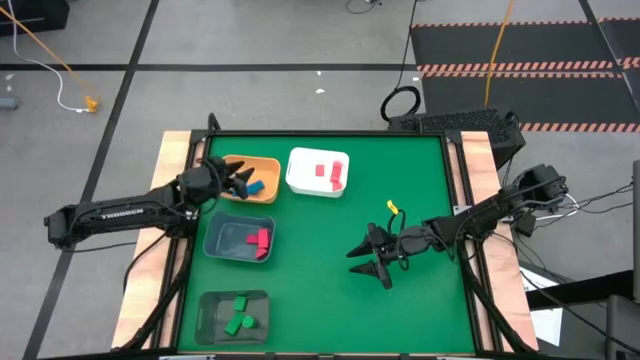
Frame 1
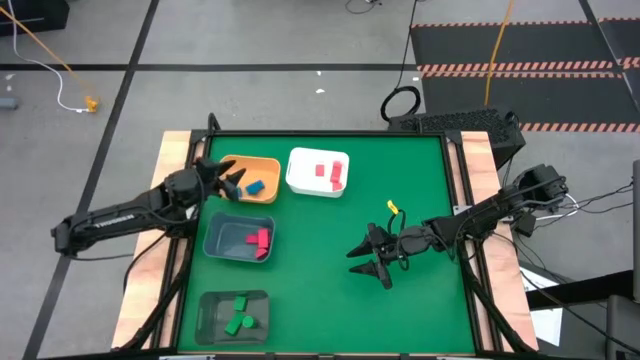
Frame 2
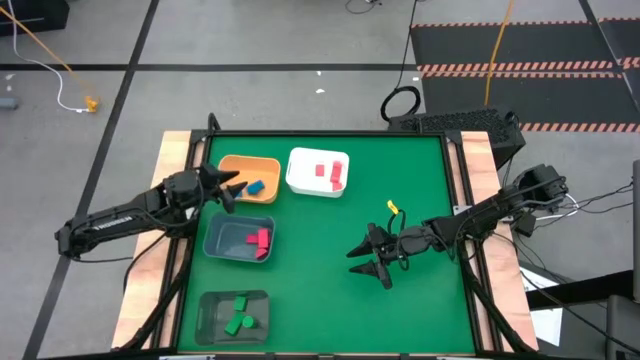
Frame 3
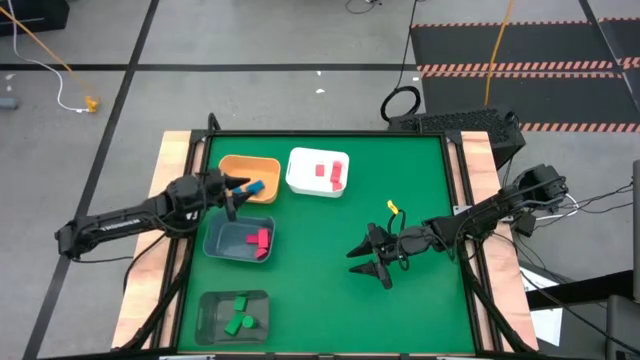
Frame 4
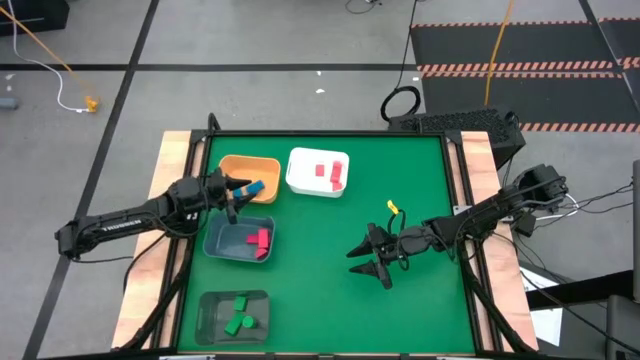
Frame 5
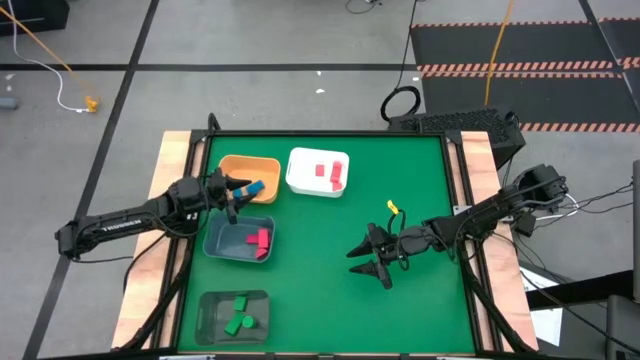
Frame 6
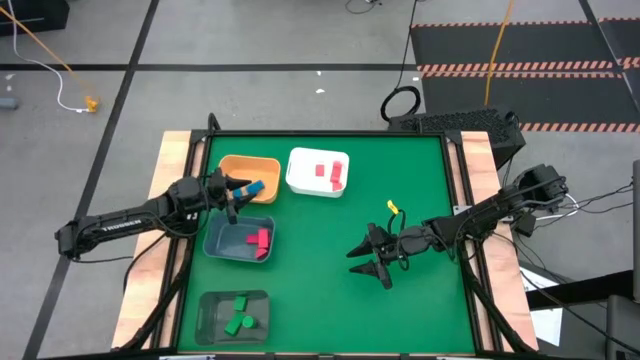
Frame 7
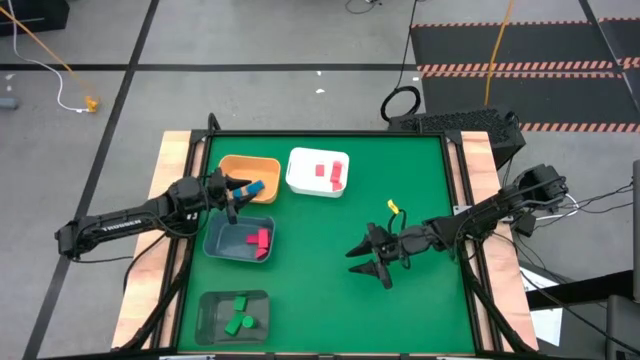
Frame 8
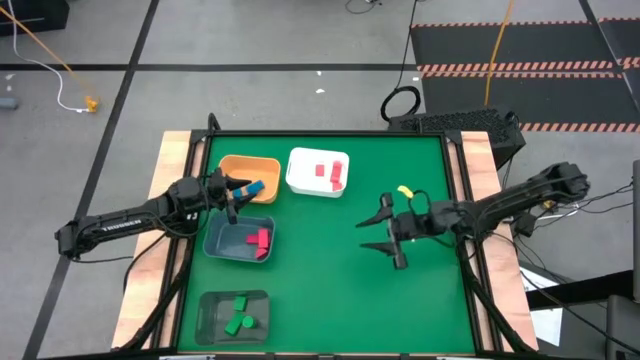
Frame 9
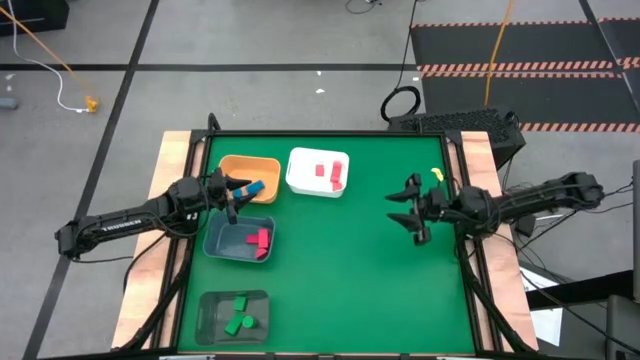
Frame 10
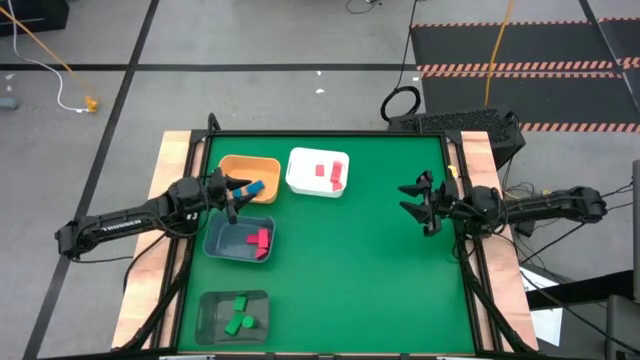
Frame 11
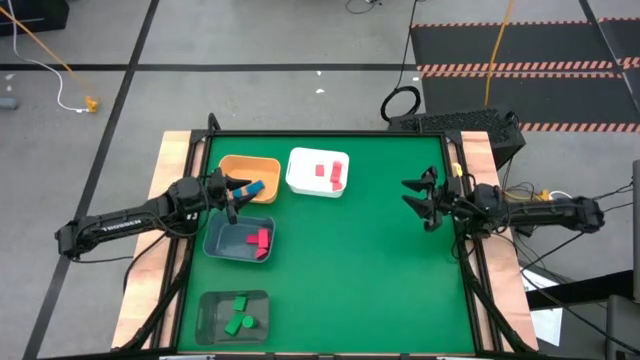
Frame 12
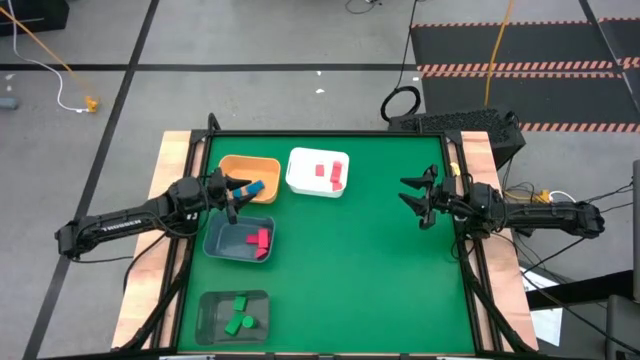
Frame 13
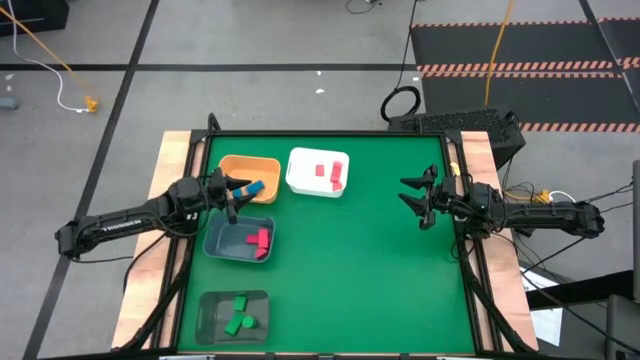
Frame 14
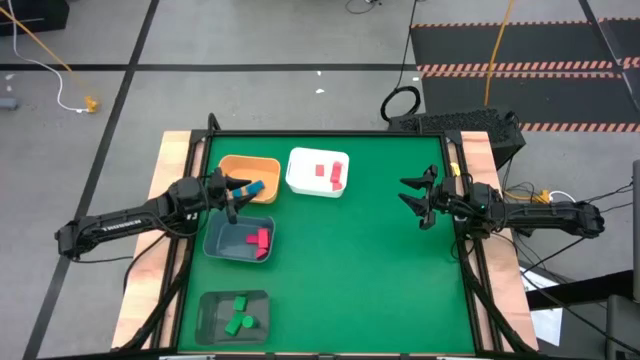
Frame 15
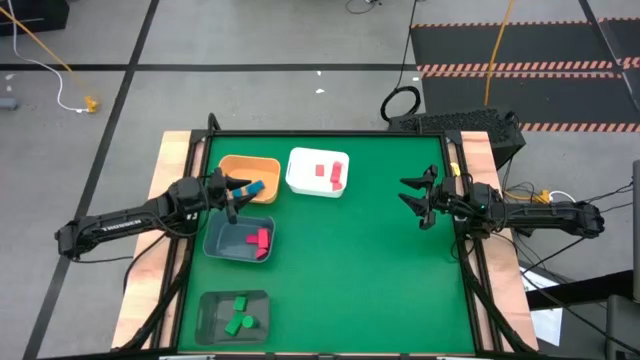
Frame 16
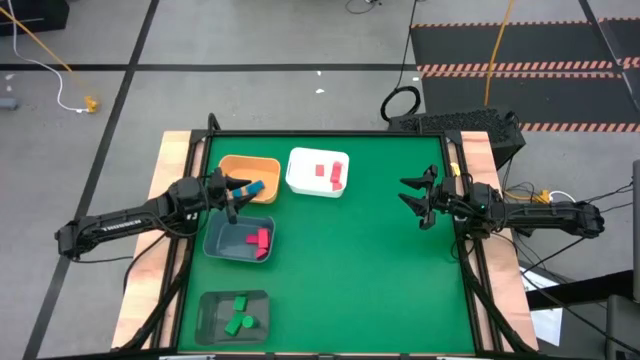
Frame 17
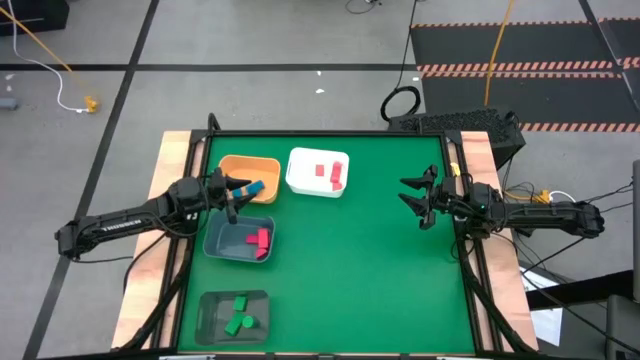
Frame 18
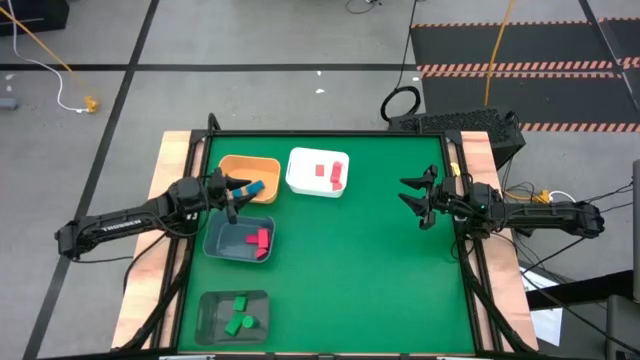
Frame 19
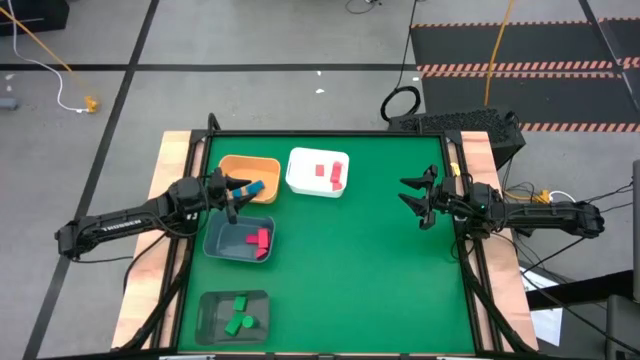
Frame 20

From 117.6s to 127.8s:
Task: Sort & place blocks by color
Return to Home Position

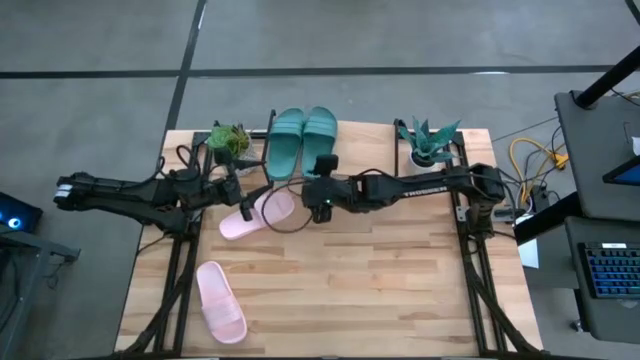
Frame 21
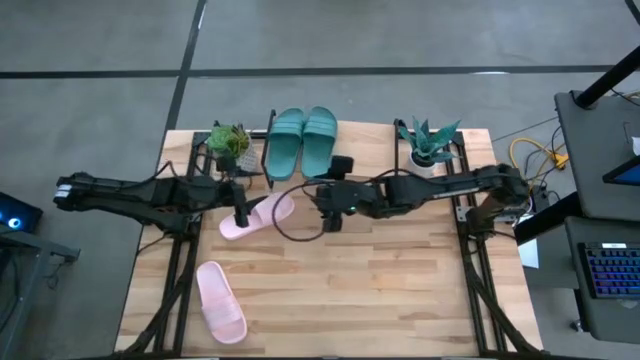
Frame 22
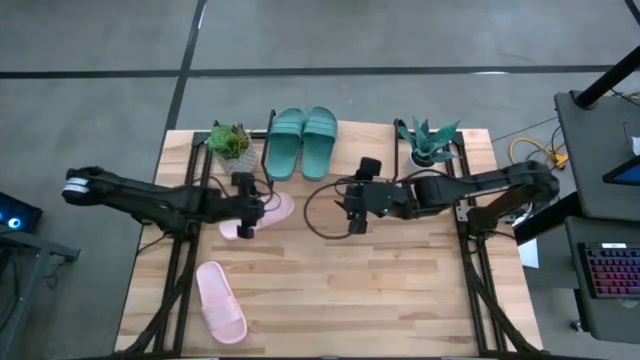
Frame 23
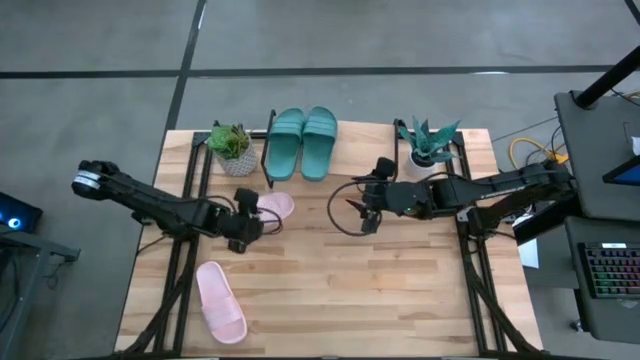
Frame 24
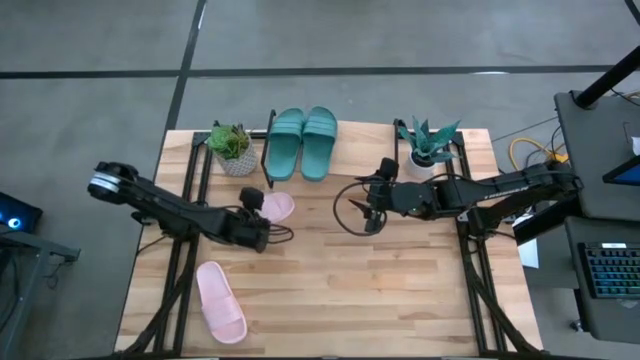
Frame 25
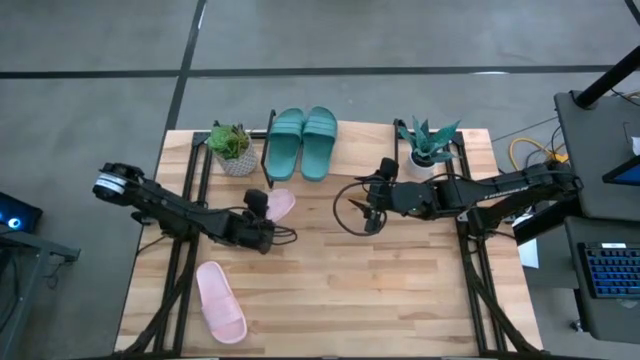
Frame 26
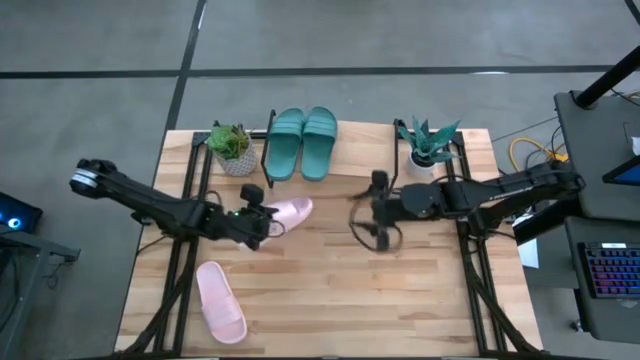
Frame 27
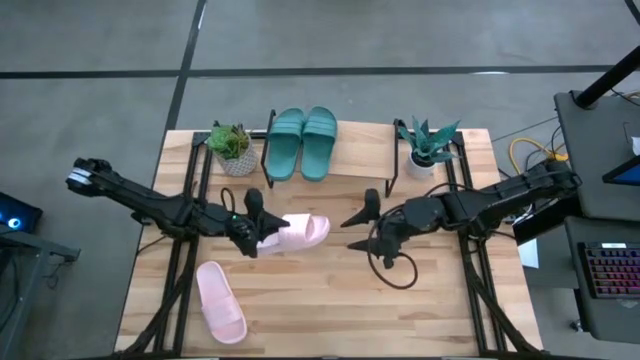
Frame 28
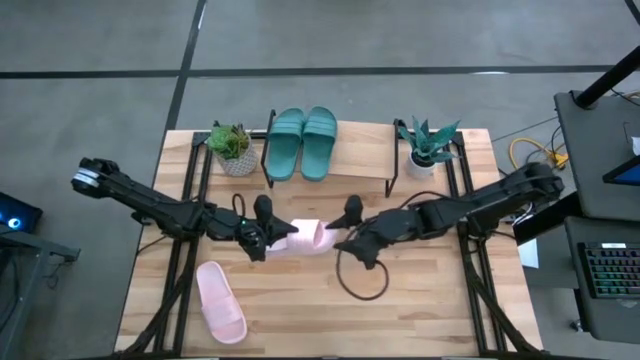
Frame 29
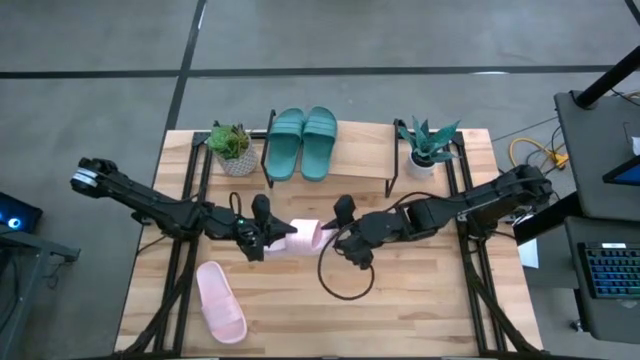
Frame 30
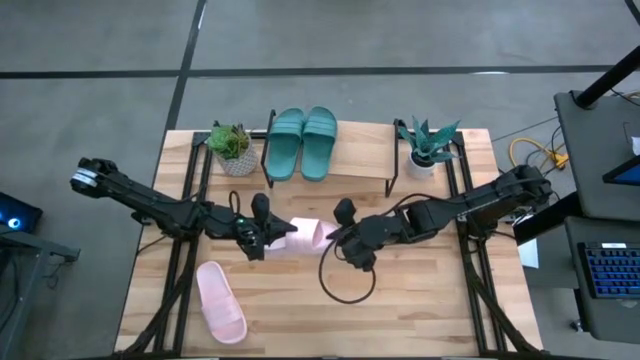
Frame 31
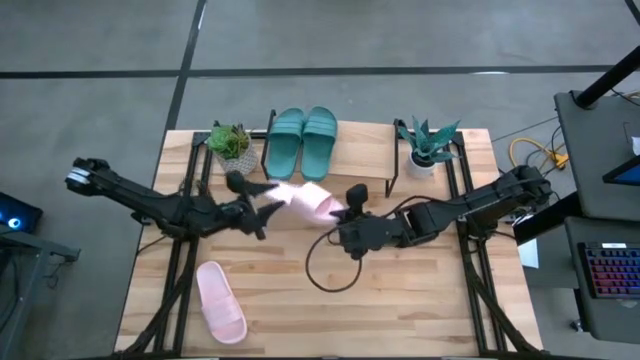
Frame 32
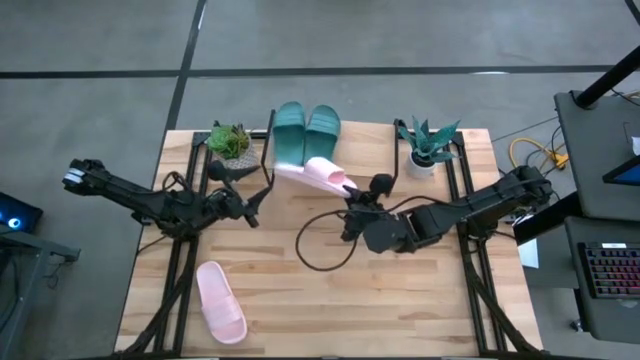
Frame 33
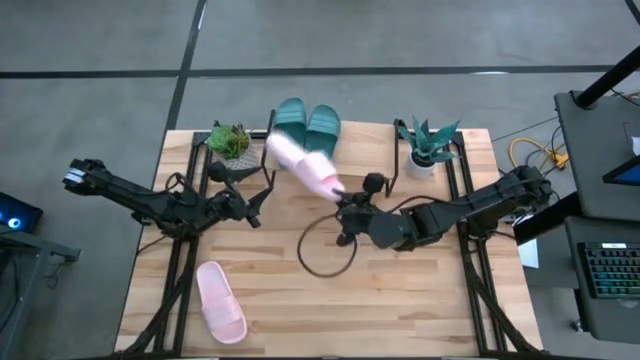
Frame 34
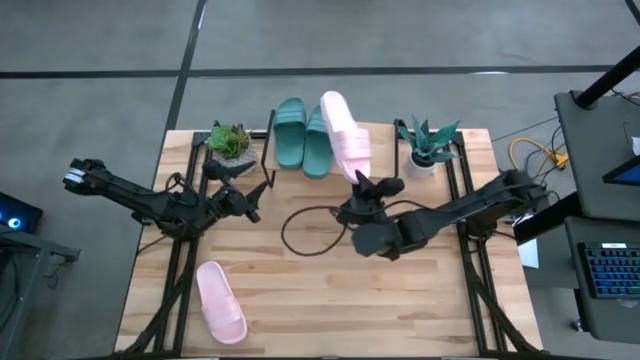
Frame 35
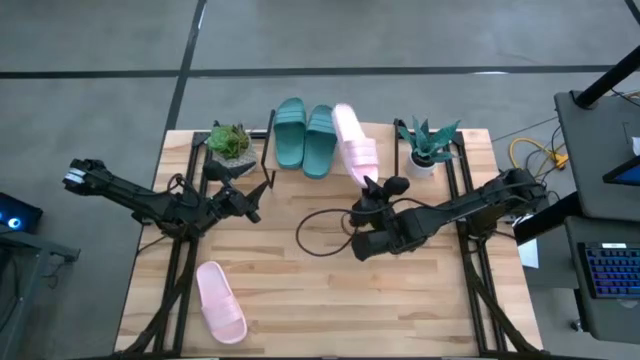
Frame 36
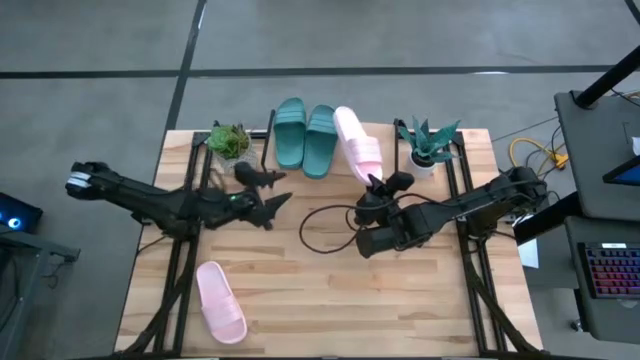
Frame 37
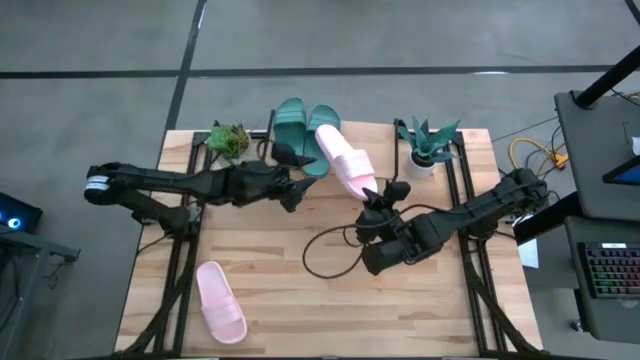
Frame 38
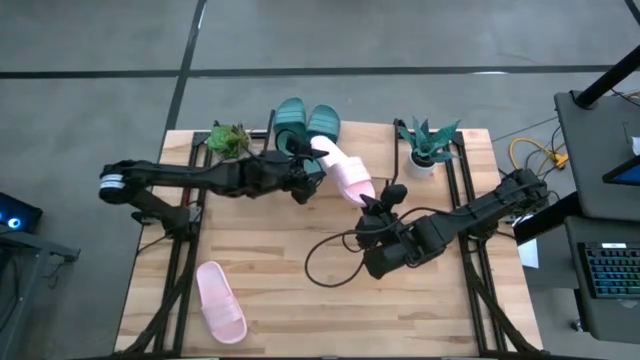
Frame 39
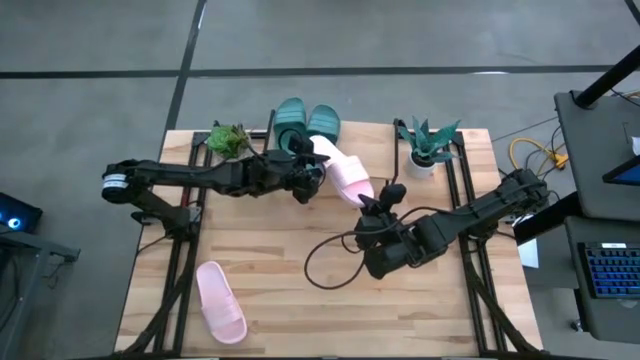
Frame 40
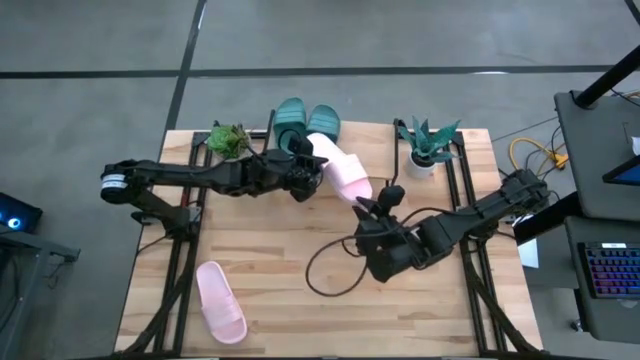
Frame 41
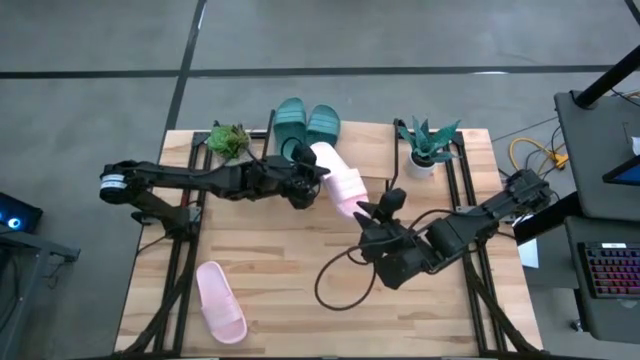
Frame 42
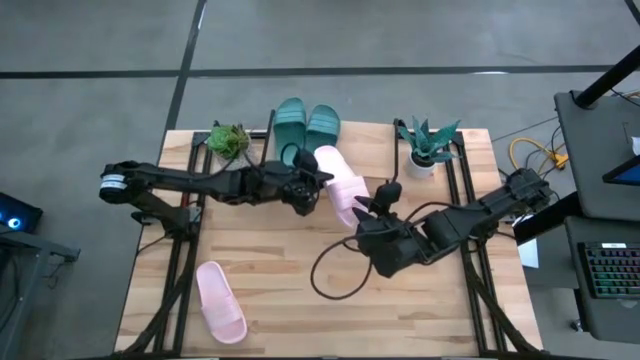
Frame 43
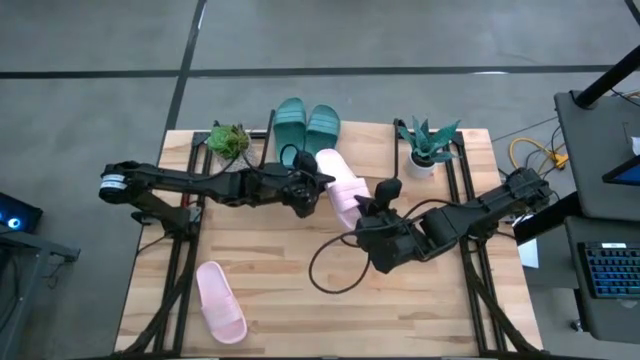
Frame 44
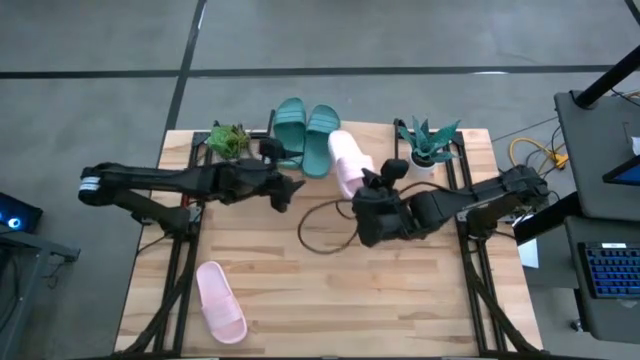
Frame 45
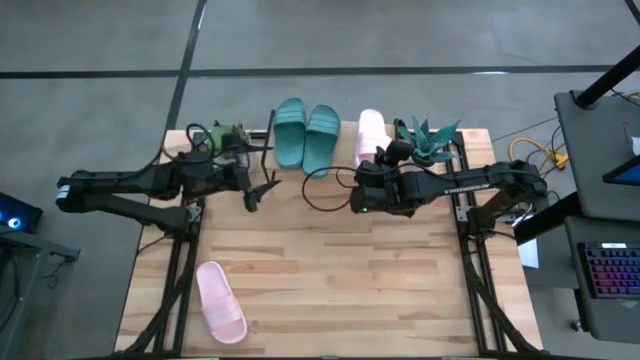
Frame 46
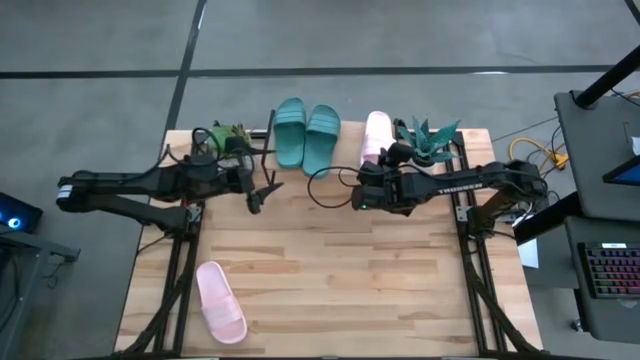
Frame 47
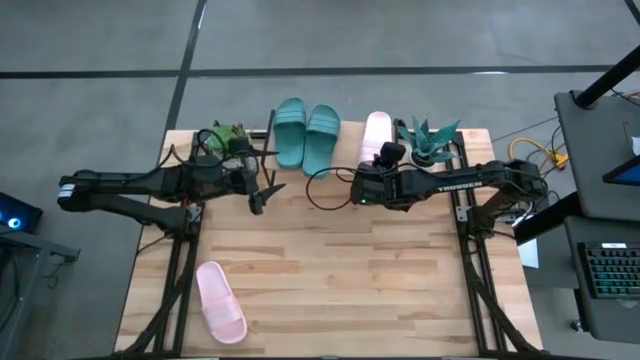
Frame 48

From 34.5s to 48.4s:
Task: Pick and place slides into the shelf
Put the top pink slide on the shelf
